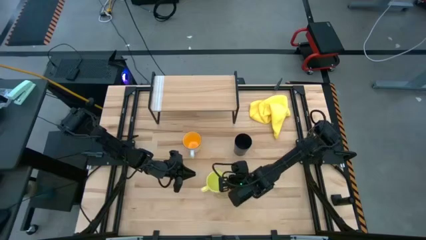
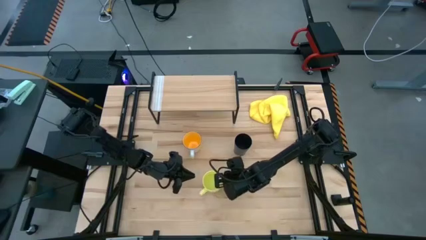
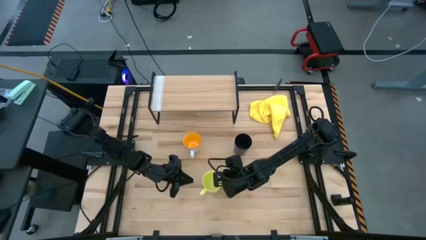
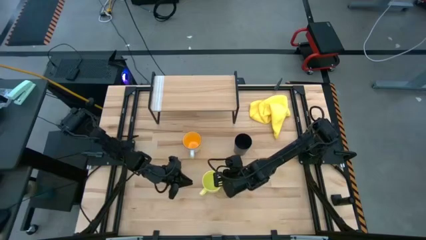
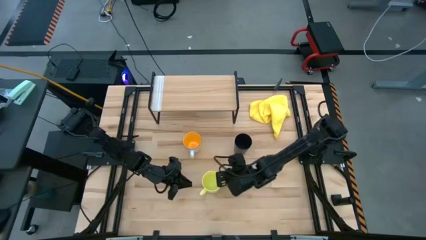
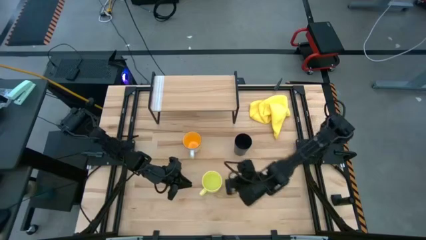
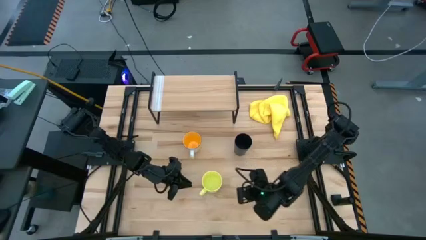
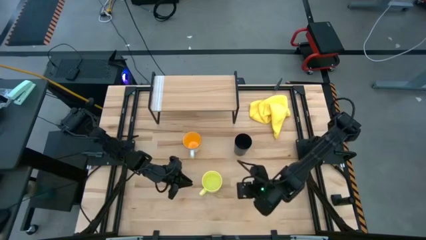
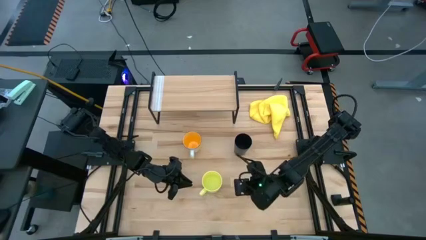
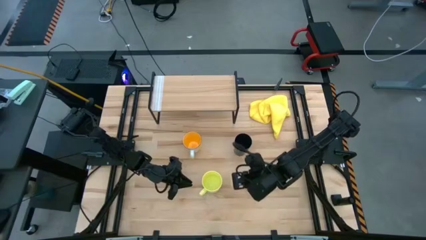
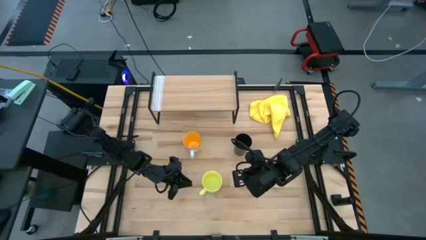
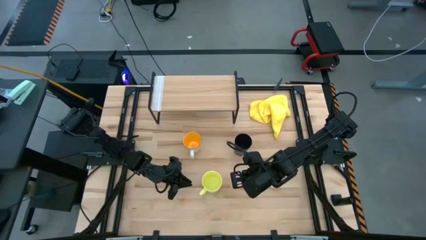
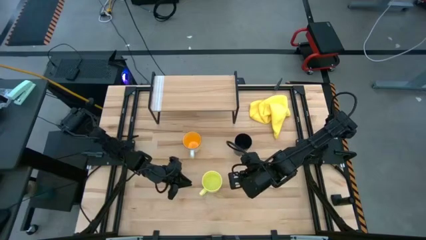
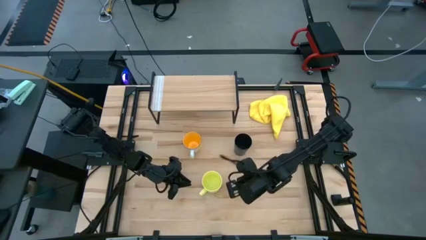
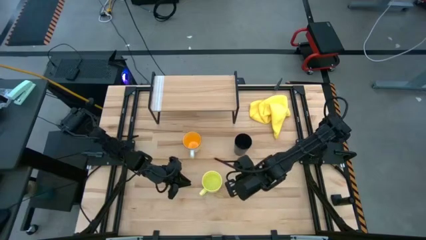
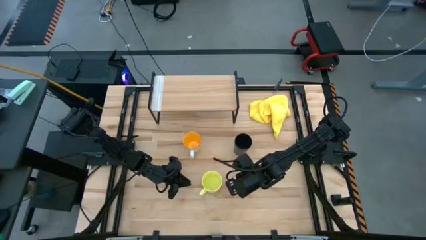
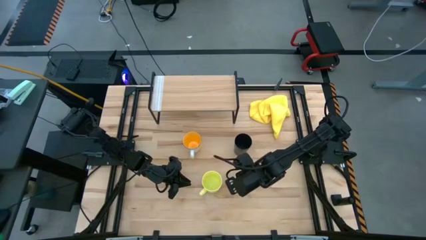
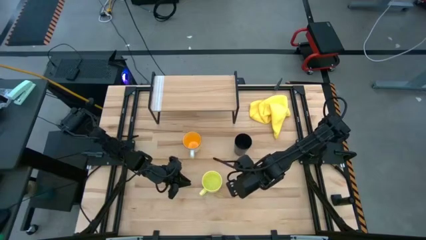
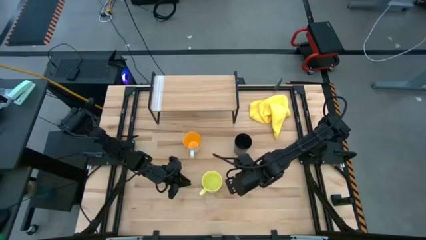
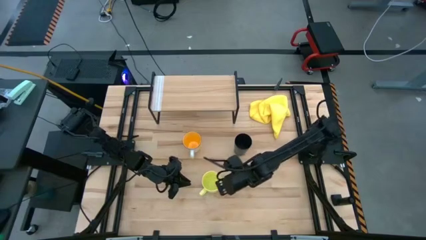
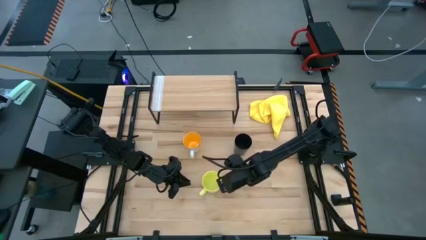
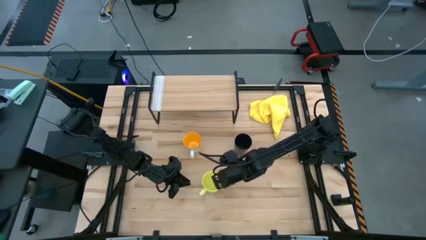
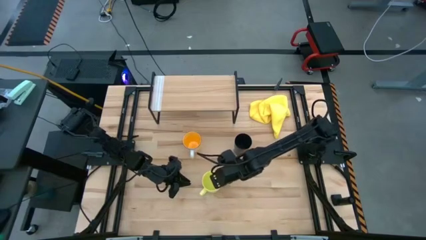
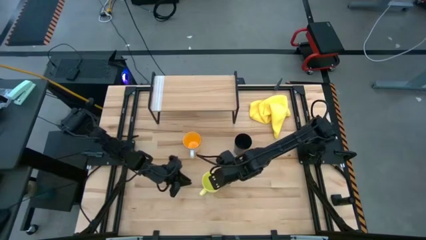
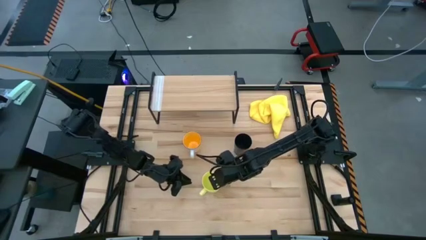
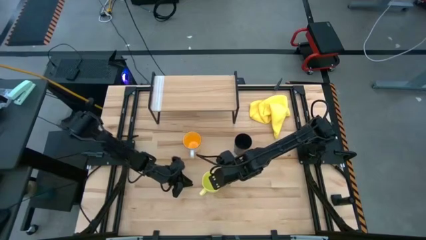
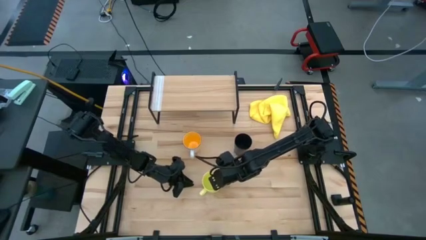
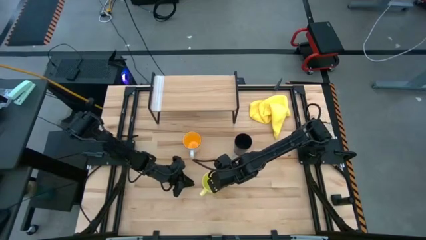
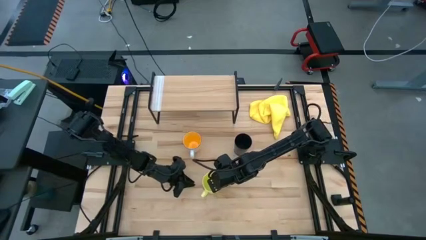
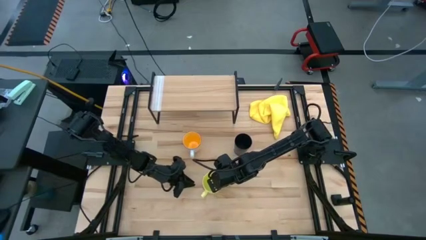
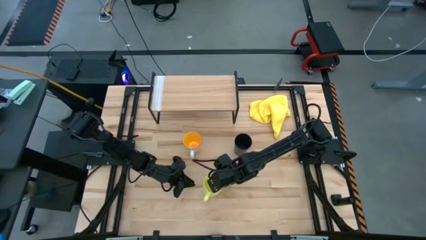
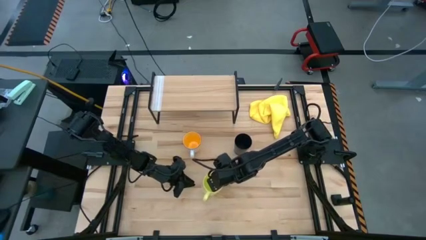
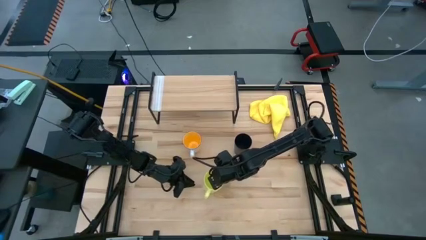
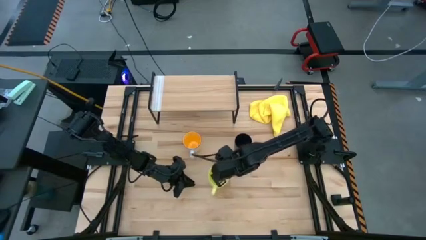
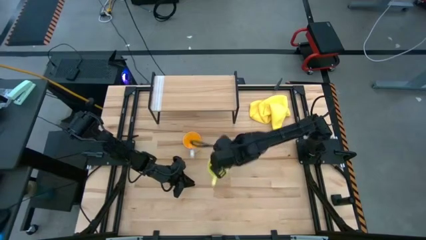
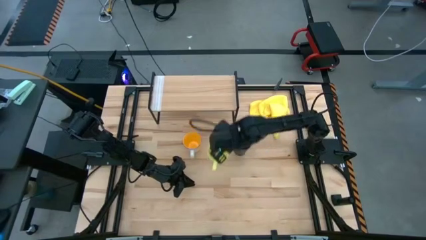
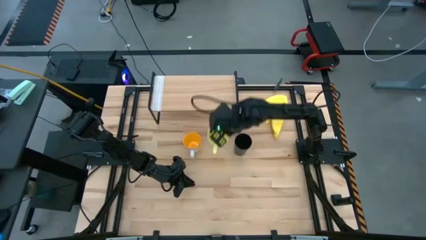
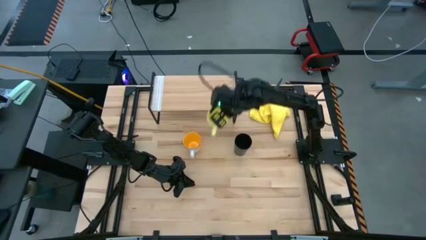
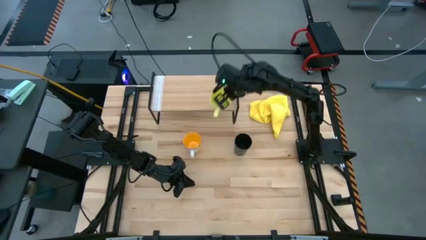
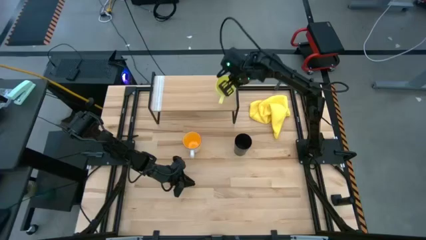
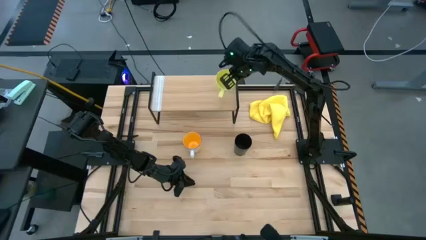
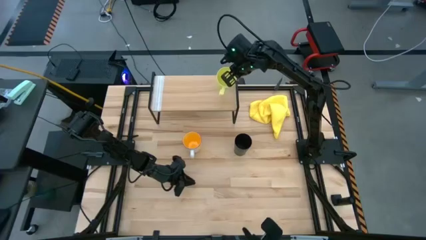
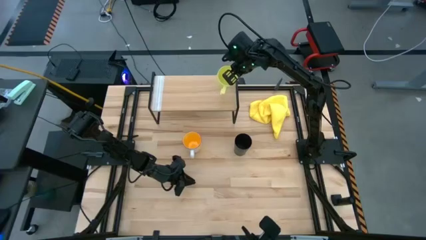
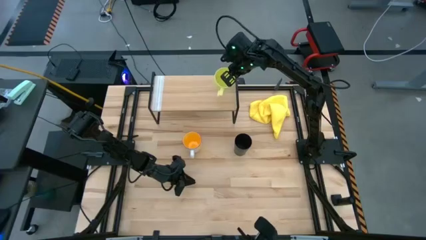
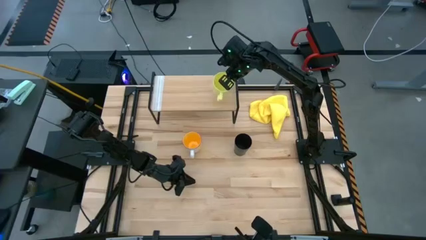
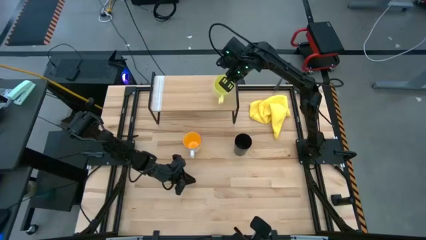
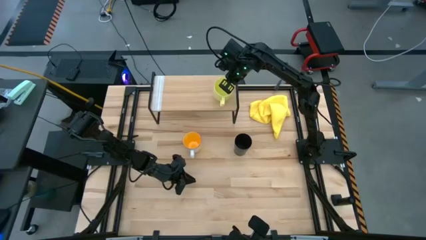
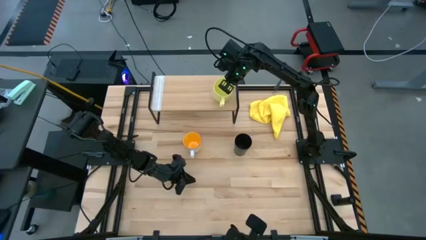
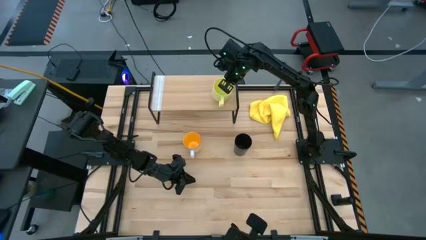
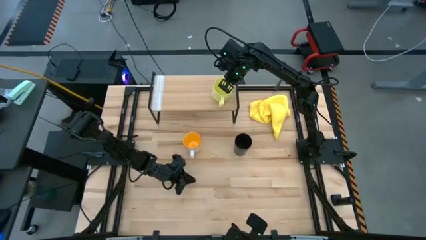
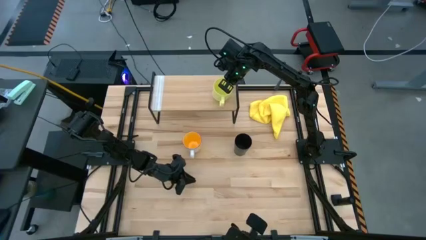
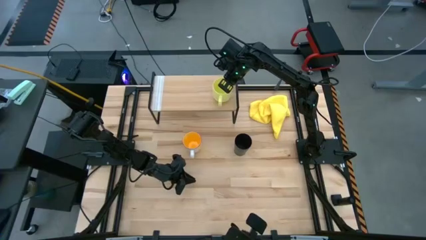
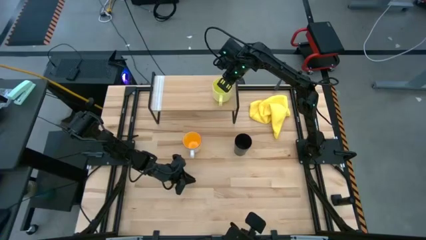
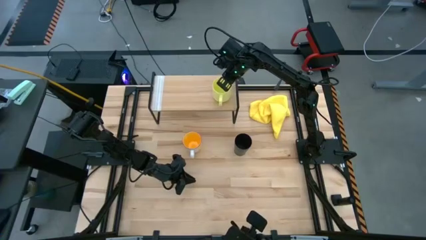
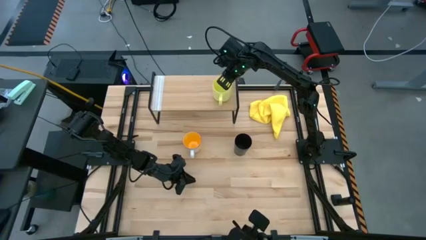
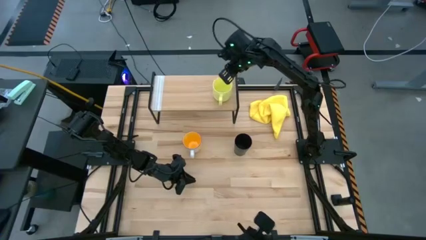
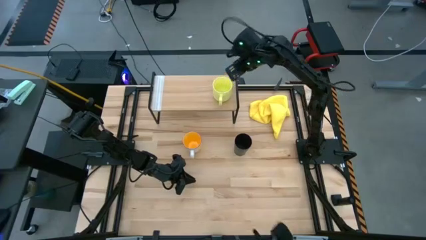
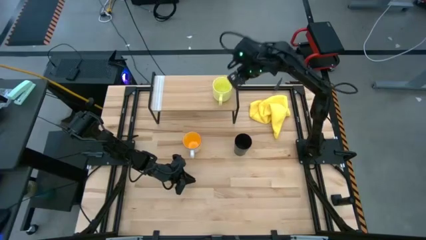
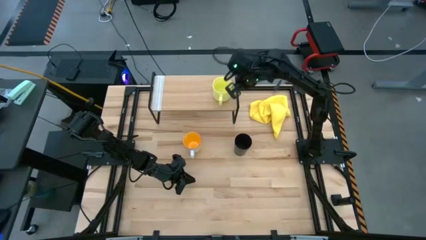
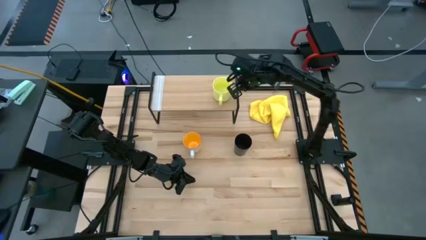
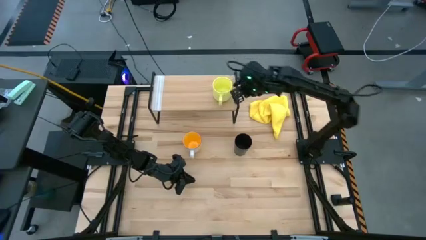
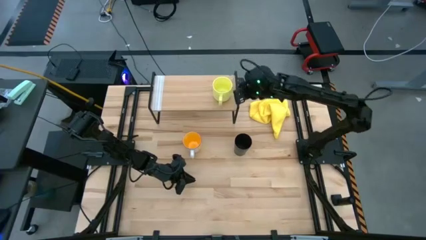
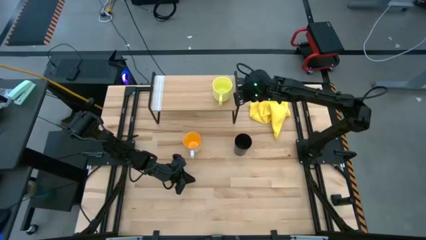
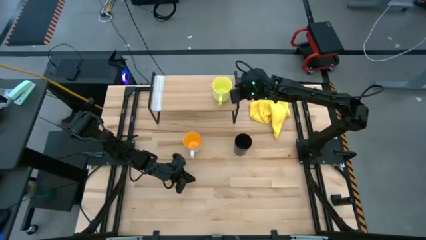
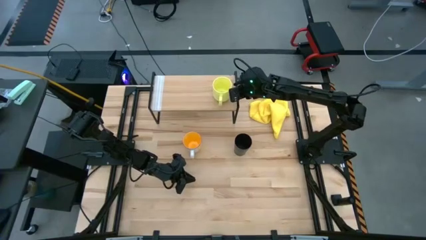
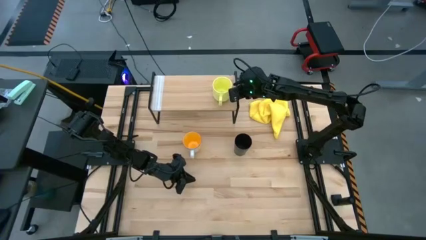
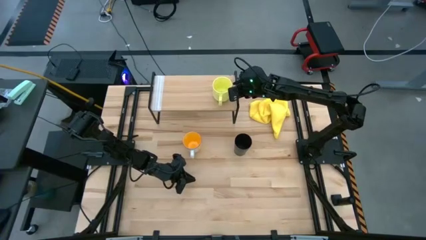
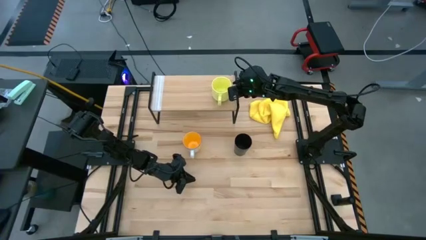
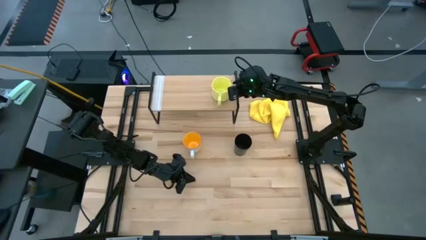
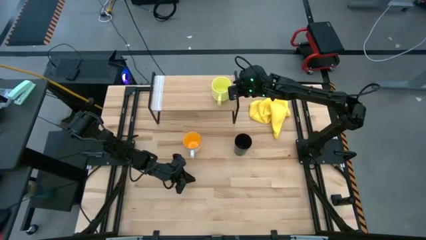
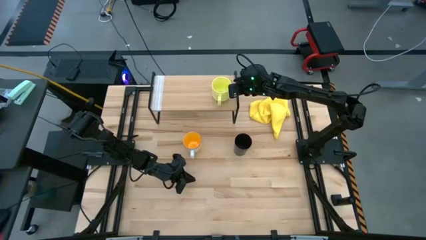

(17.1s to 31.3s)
Task: Stack small to large cups/mugs on shelf
Put the yellow mug on the shelf
